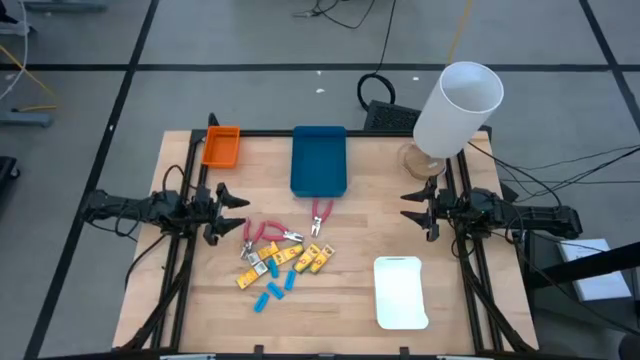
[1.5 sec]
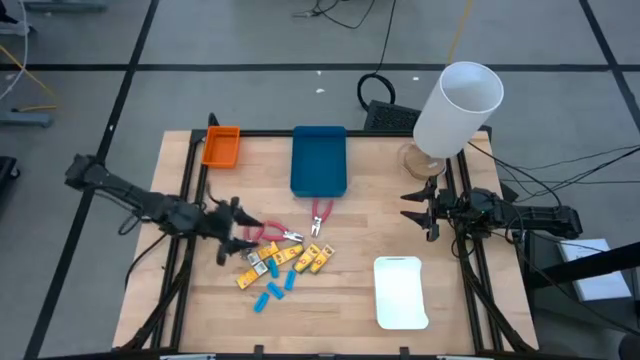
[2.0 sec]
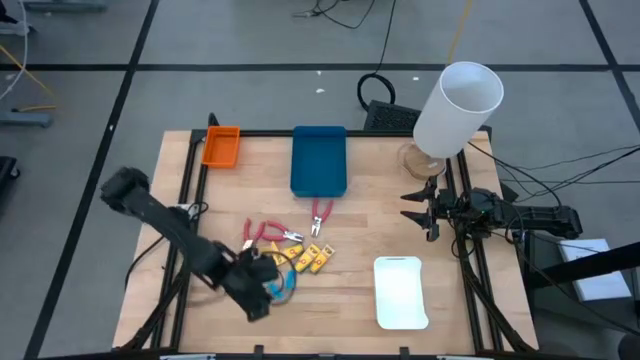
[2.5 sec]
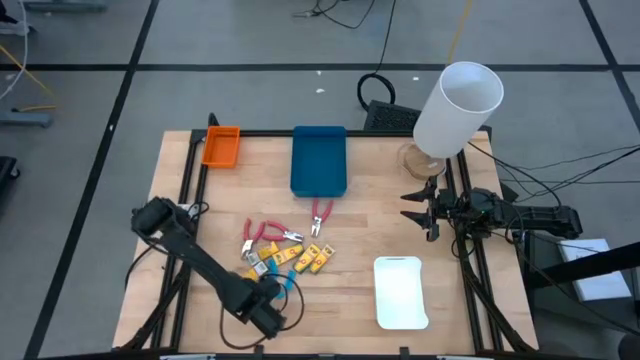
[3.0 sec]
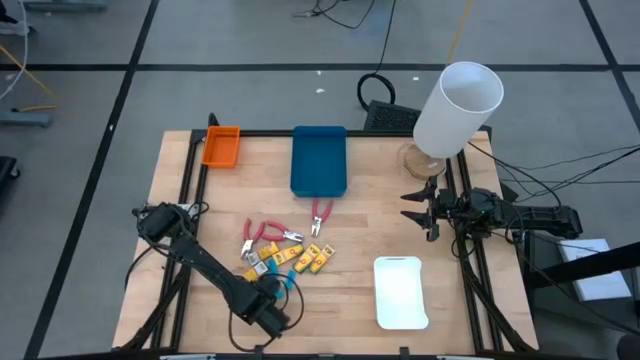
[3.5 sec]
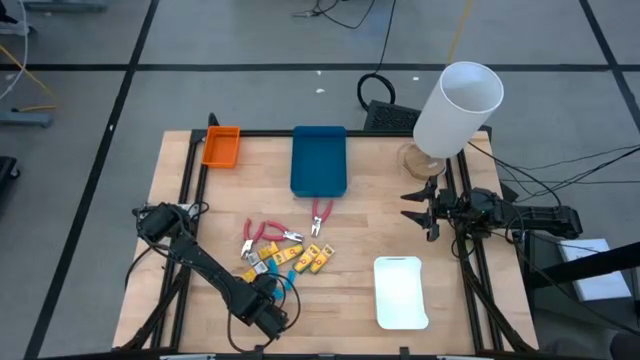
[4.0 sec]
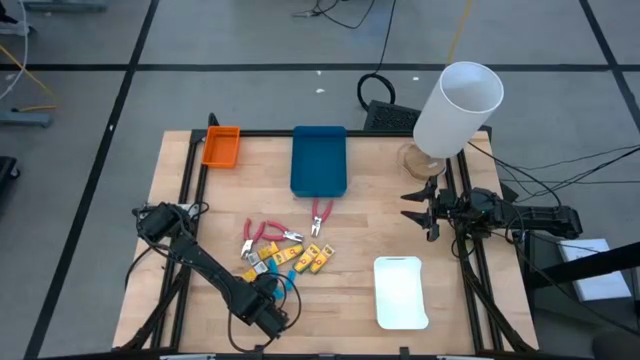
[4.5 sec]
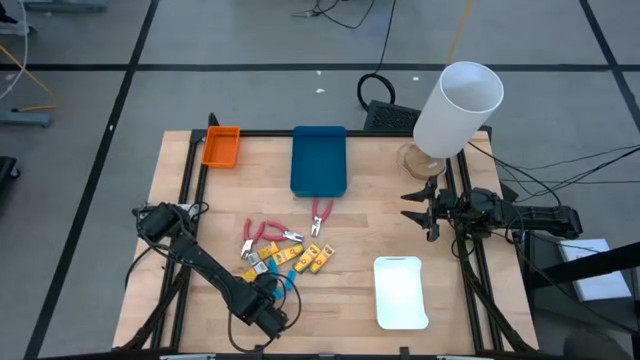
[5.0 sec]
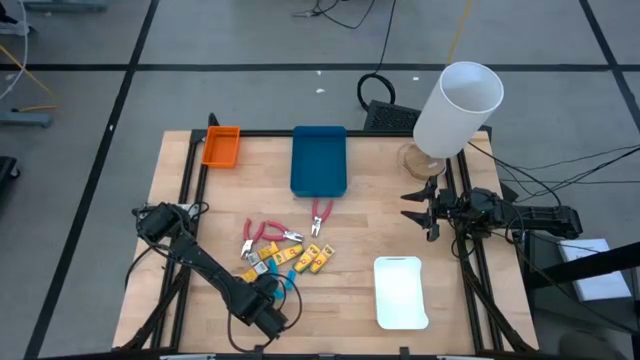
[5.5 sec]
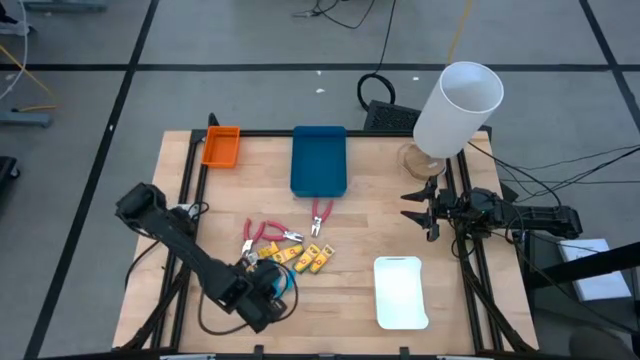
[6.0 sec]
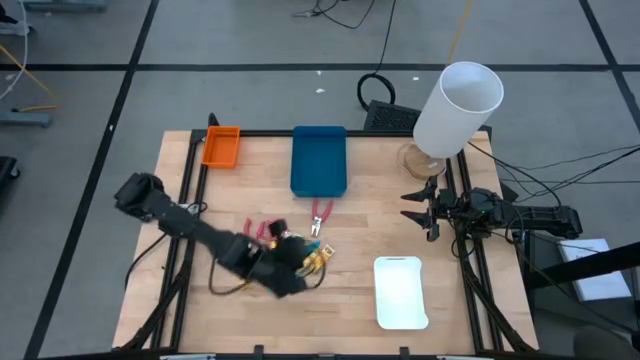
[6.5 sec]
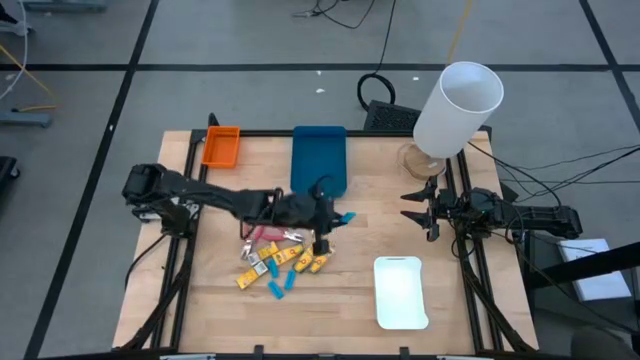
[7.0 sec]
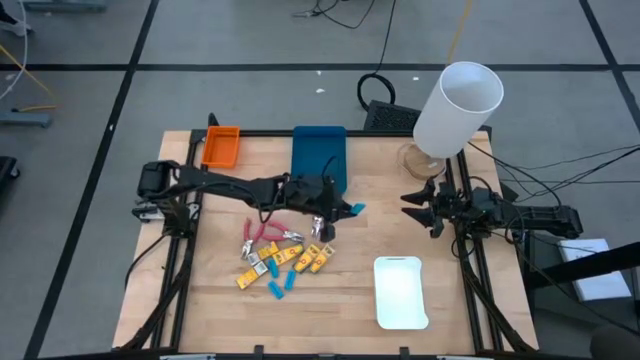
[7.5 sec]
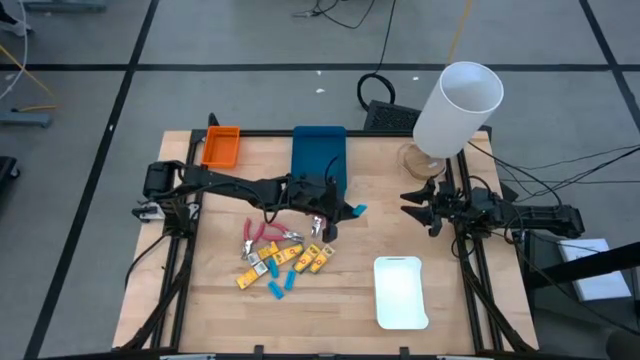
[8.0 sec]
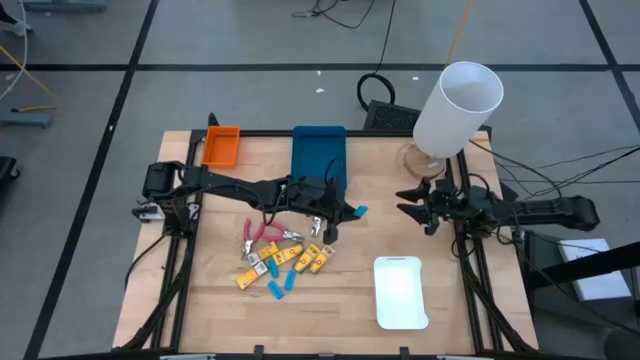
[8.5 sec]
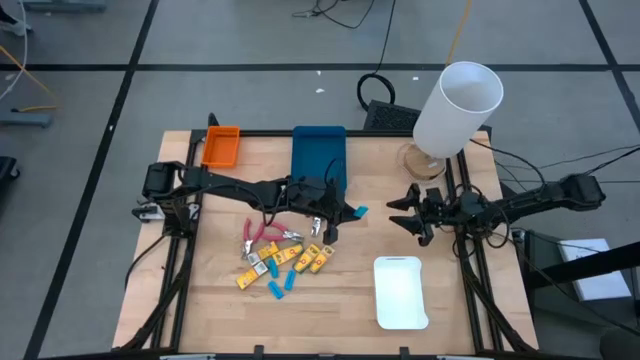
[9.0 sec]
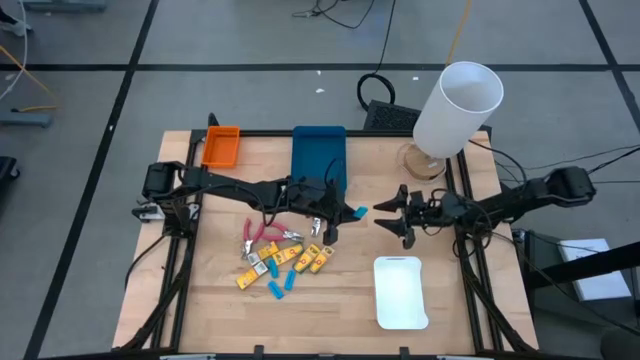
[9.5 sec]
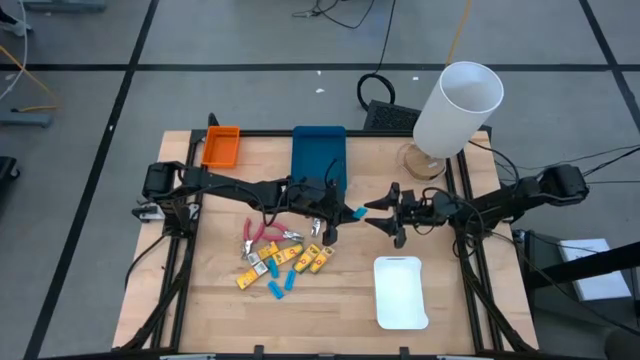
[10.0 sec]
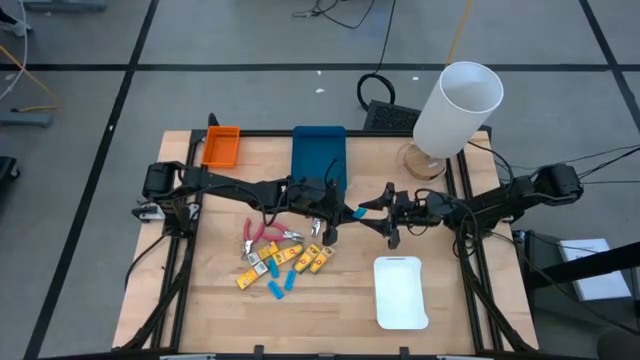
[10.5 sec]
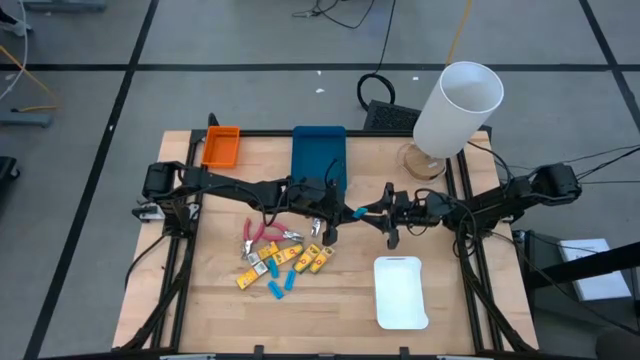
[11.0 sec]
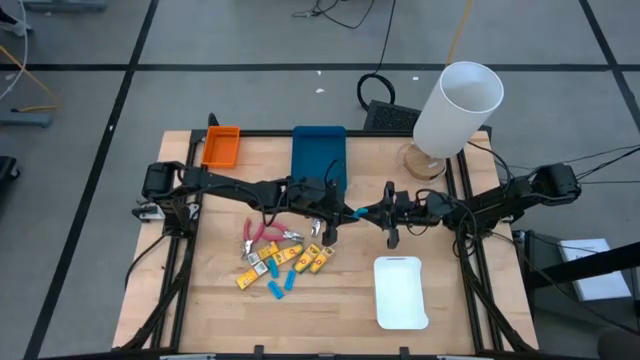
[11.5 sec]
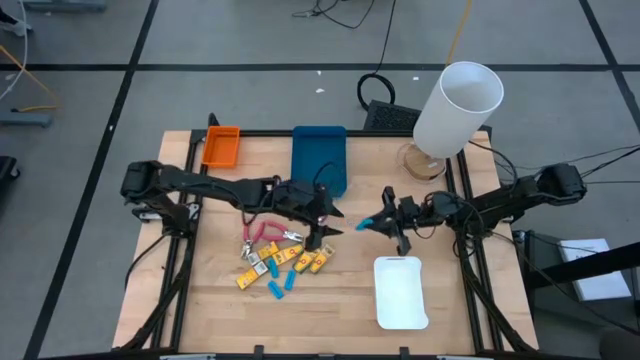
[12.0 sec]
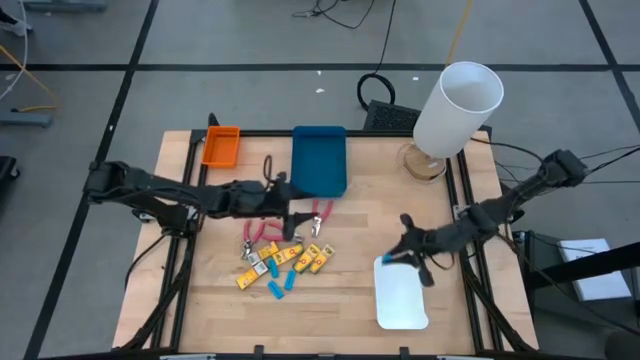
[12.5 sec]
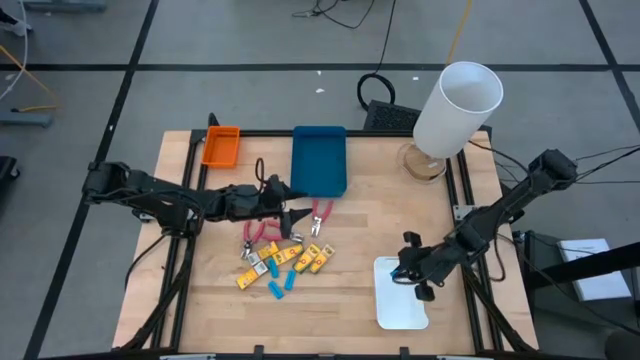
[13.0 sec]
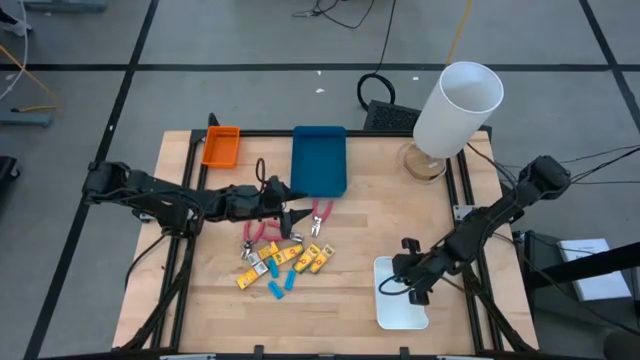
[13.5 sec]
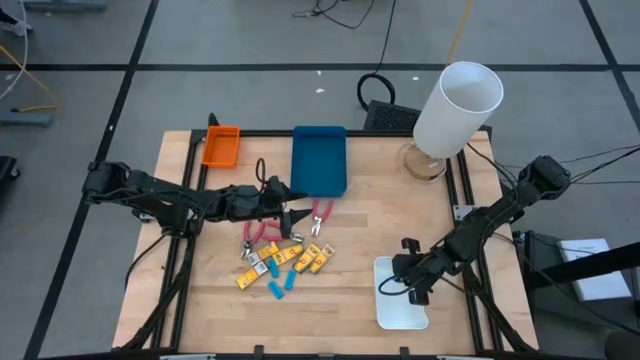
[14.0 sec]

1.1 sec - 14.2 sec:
Task: Pick & Place School Supplies
Put the blue eraser into the white bin
